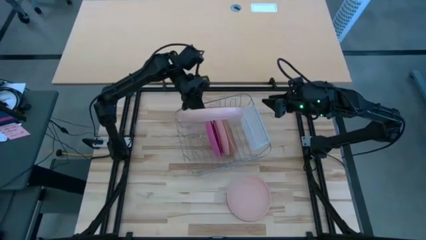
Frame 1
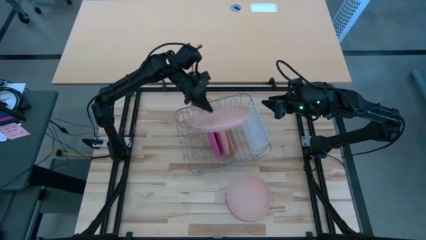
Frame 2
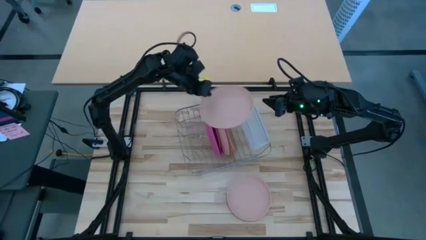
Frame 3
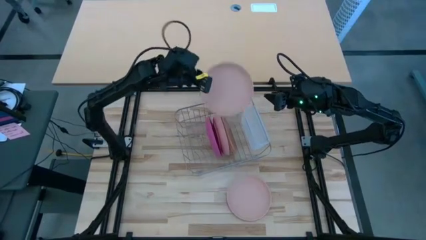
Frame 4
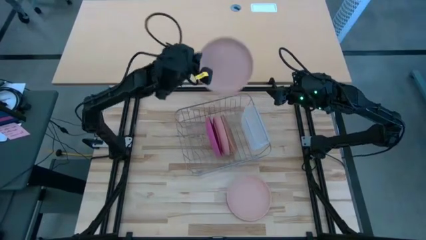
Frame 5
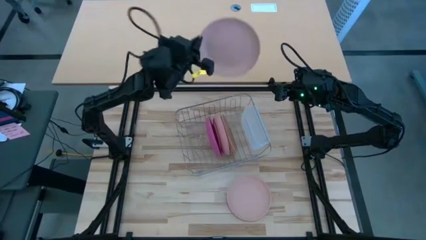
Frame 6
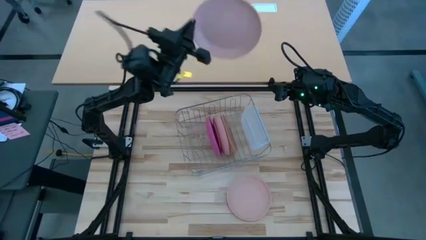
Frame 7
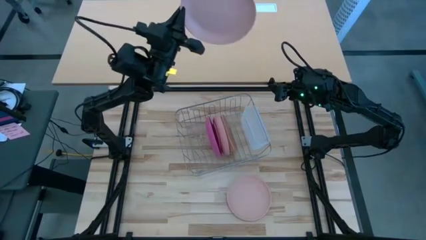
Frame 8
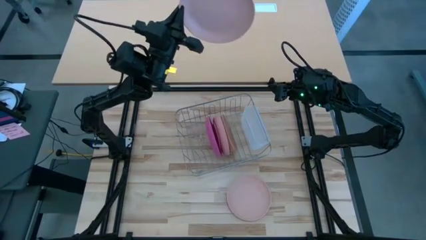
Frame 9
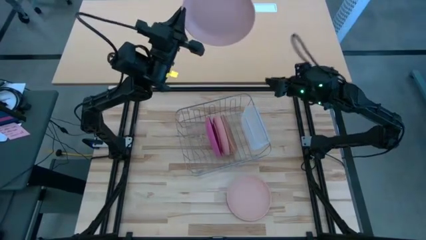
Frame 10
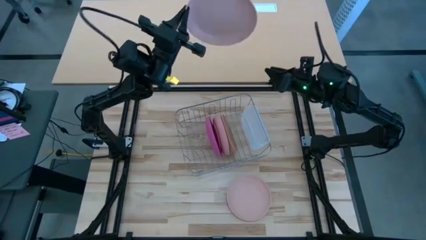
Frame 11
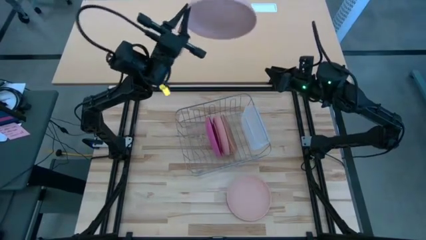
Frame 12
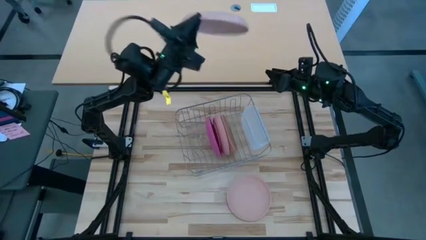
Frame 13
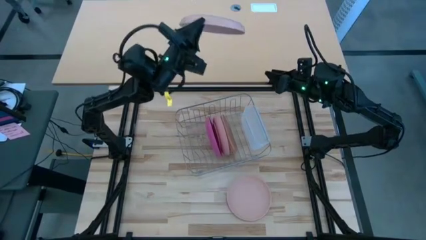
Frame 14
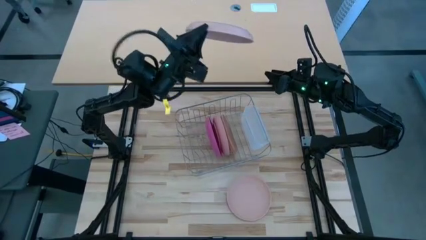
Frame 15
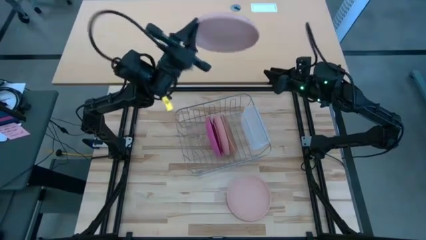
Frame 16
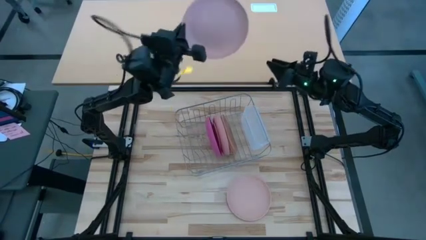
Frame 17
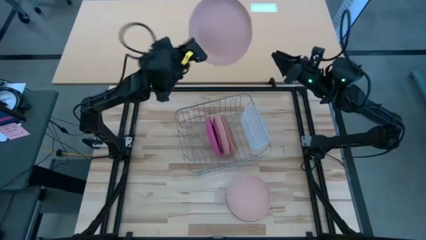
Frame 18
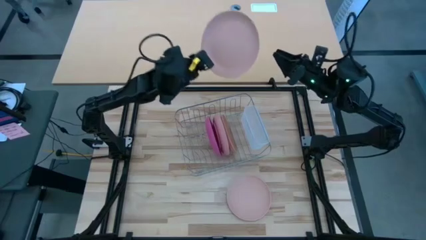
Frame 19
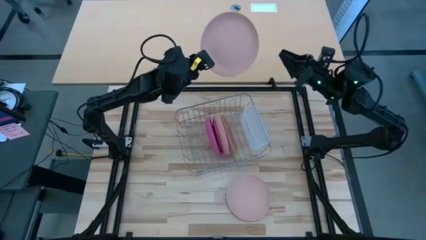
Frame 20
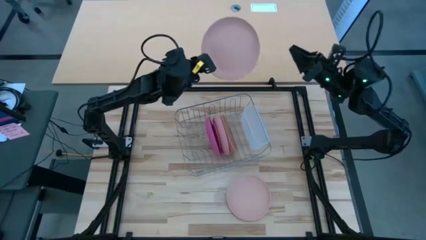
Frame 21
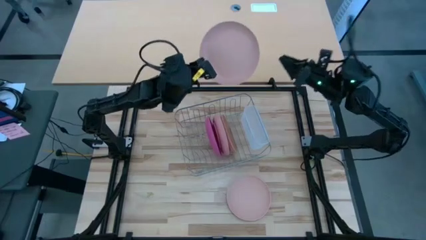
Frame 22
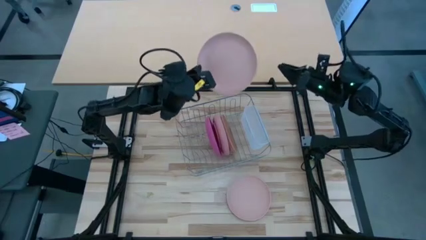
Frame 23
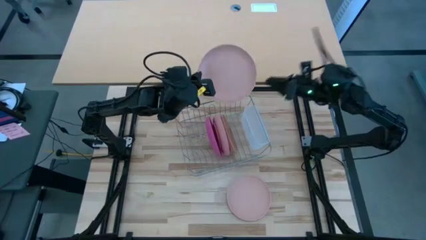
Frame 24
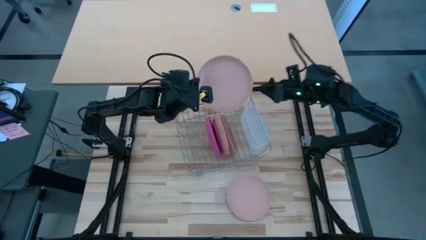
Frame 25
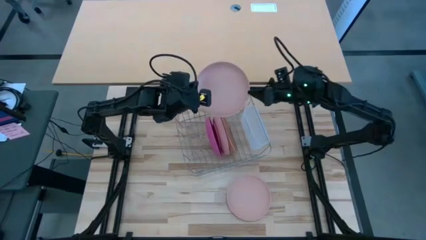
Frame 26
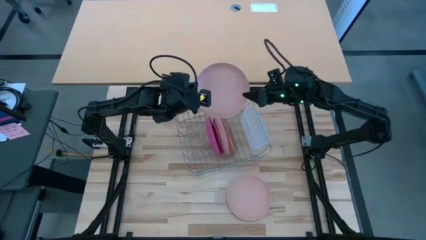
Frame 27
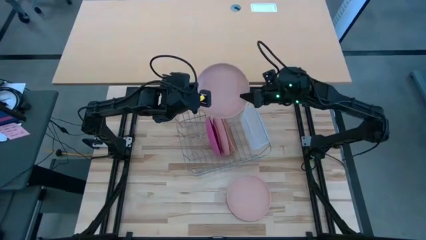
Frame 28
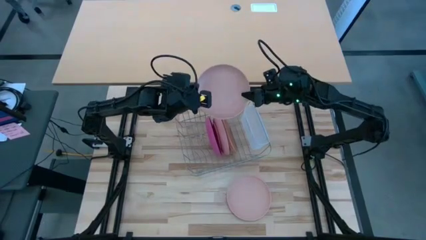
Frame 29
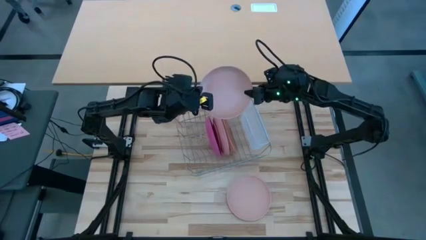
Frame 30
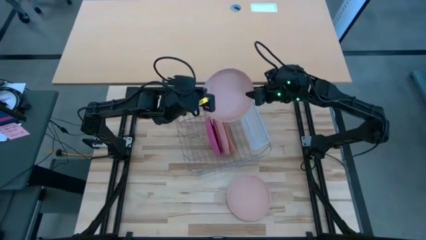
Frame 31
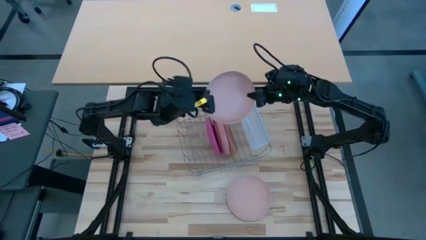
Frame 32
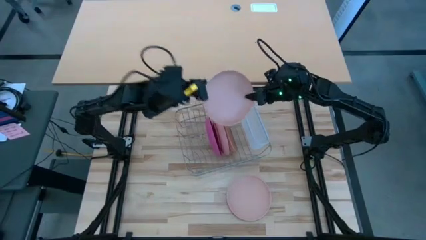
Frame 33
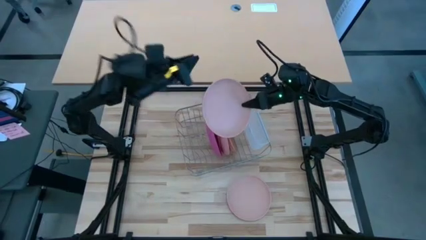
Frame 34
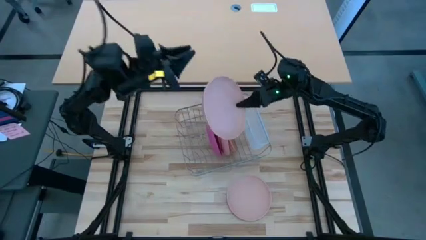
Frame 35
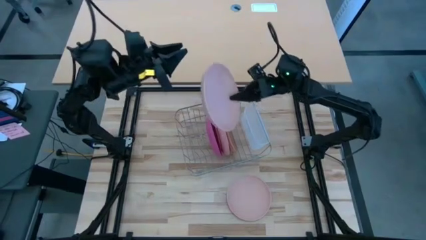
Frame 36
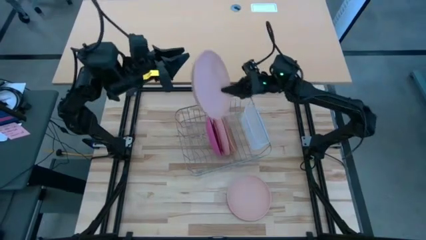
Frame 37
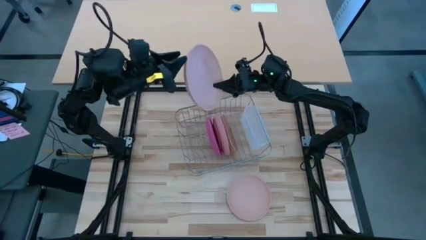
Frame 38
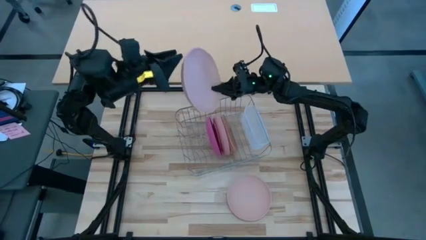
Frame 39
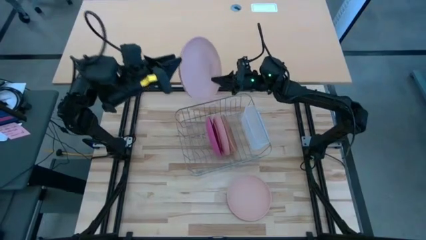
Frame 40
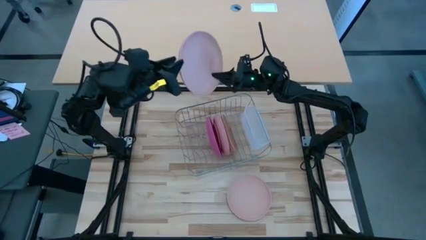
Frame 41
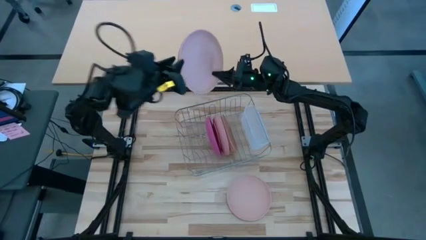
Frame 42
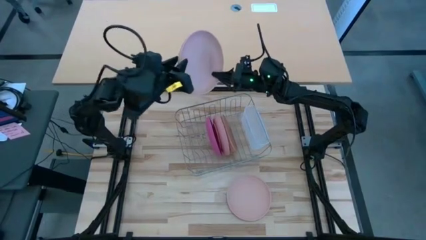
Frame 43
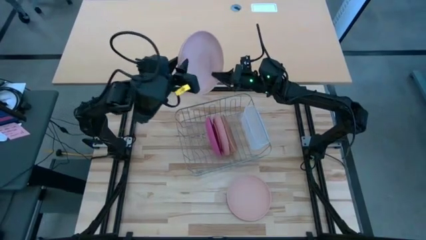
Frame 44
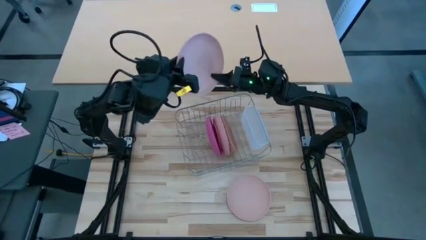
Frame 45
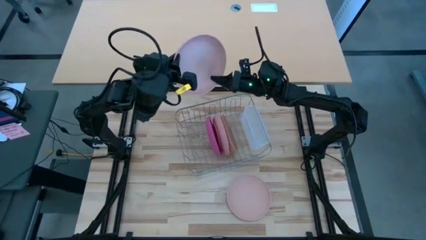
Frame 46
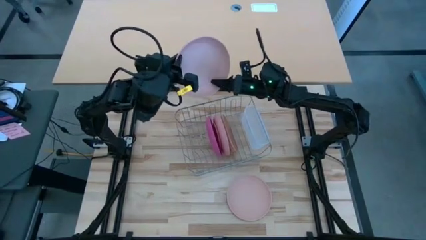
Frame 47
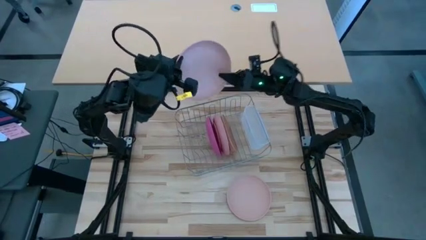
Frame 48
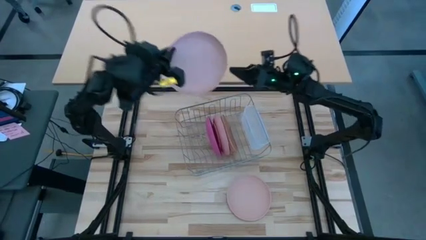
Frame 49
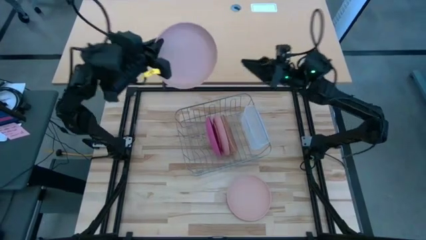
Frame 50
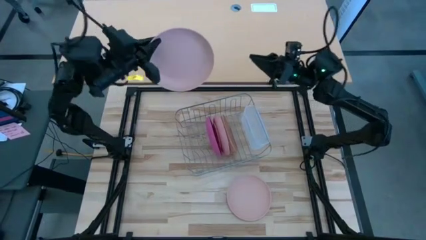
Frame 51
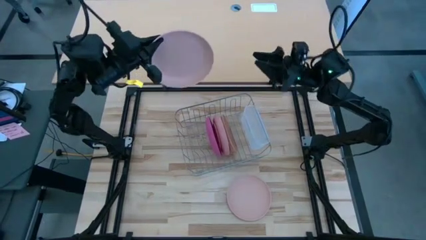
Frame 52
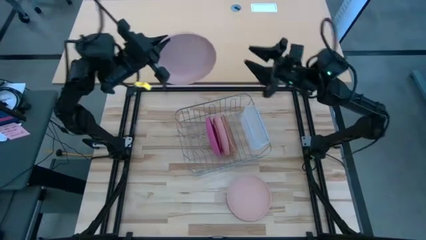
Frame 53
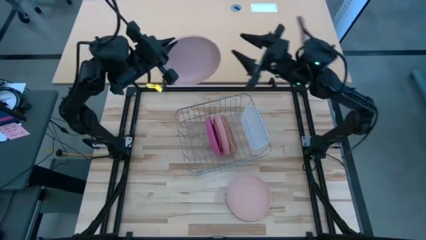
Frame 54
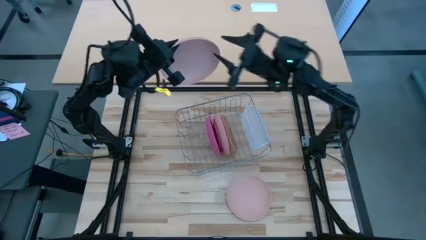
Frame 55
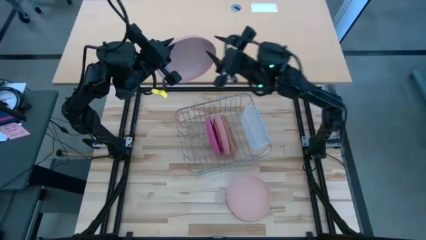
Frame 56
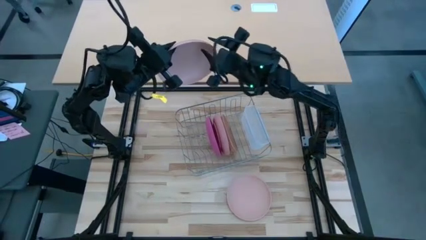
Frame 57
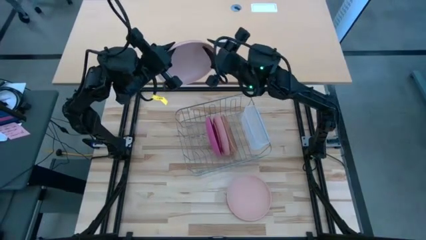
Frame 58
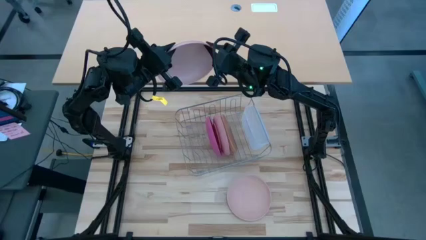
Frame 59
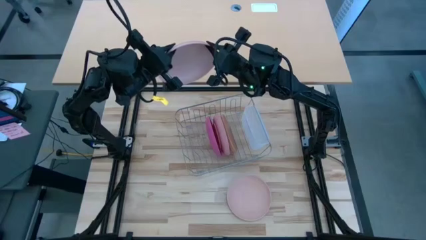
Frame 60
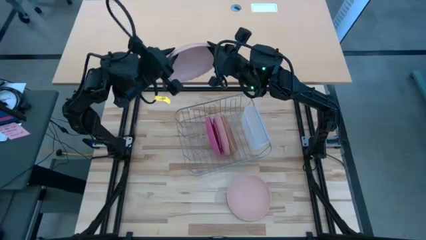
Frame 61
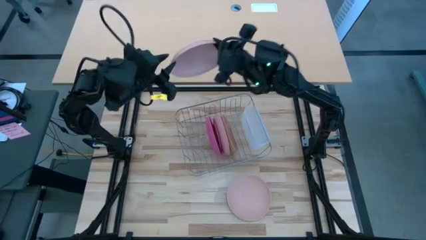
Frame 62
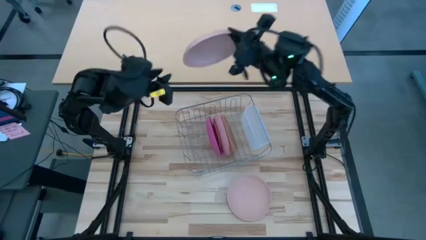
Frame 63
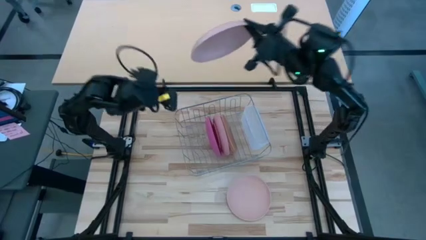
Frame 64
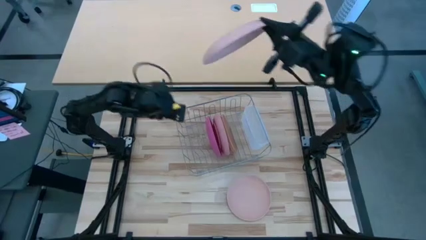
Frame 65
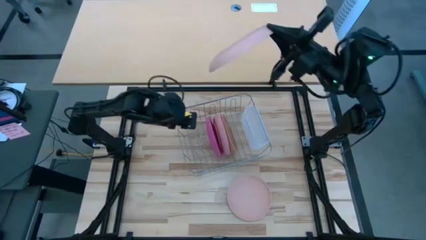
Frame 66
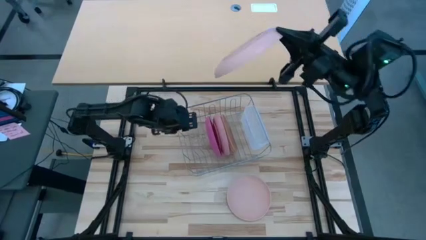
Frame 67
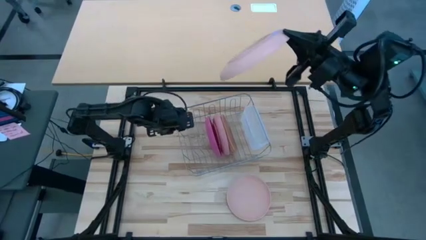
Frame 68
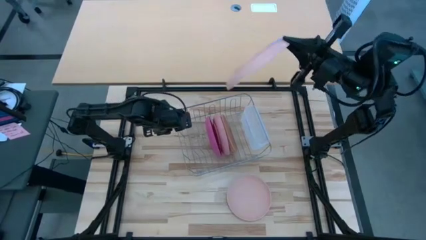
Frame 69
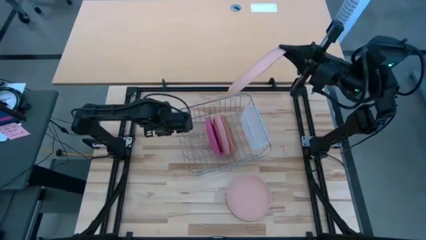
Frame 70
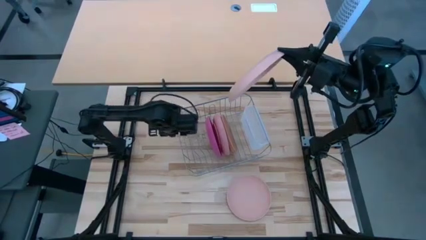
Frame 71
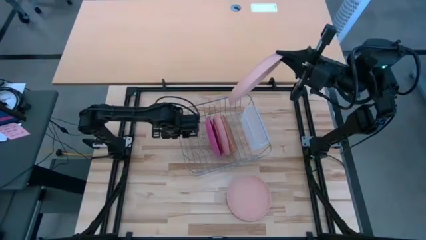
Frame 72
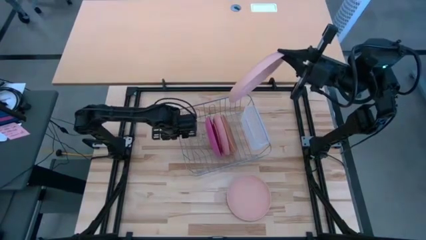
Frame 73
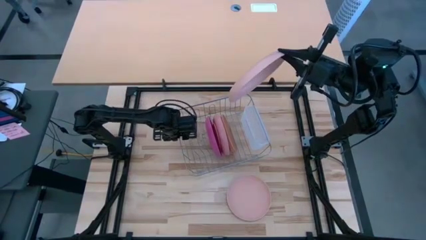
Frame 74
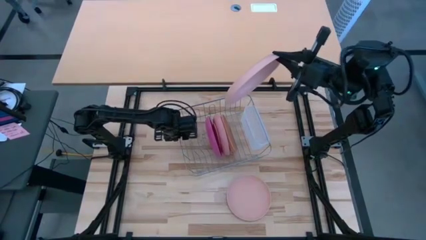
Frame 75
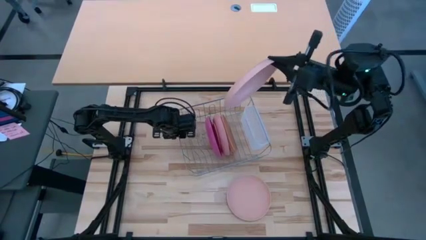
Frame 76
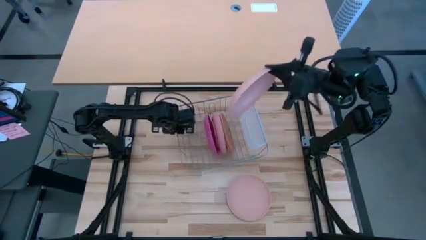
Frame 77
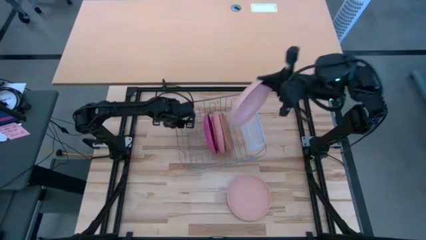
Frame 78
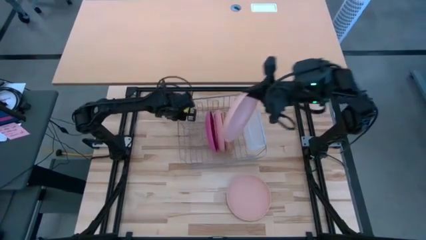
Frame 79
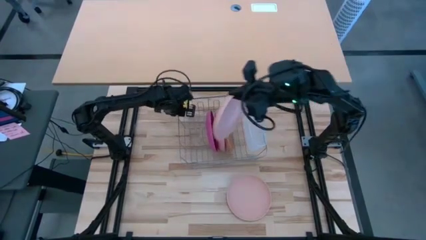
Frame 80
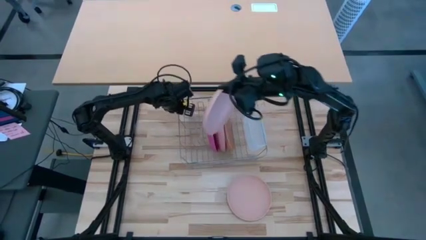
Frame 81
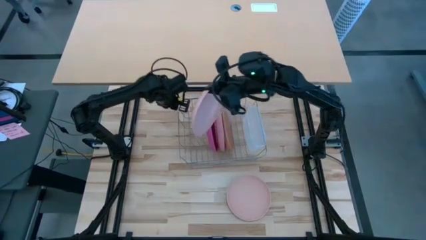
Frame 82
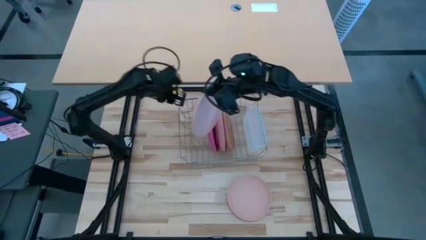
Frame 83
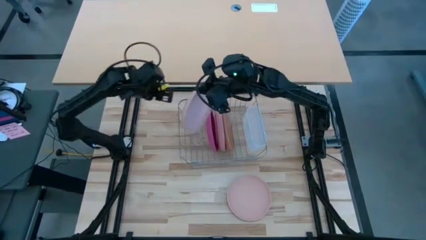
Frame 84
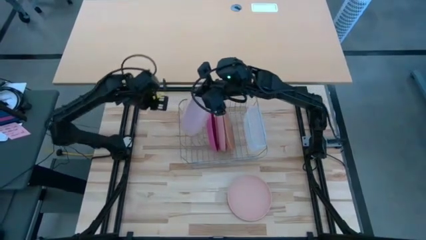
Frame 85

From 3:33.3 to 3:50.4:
Task: Sort dishes
Put the top beige plate in the dish rack
